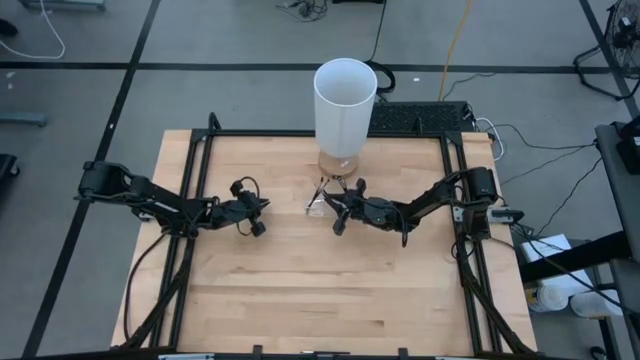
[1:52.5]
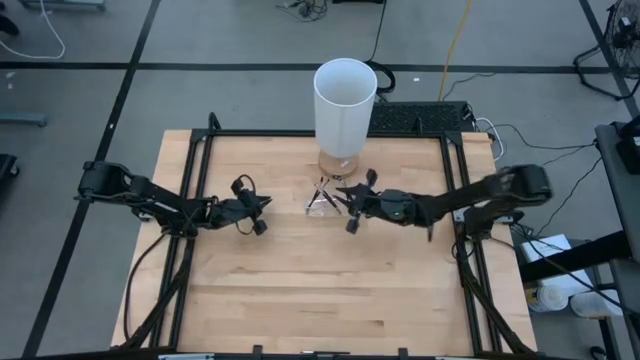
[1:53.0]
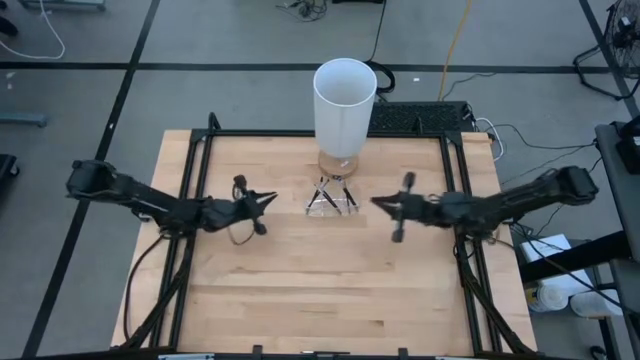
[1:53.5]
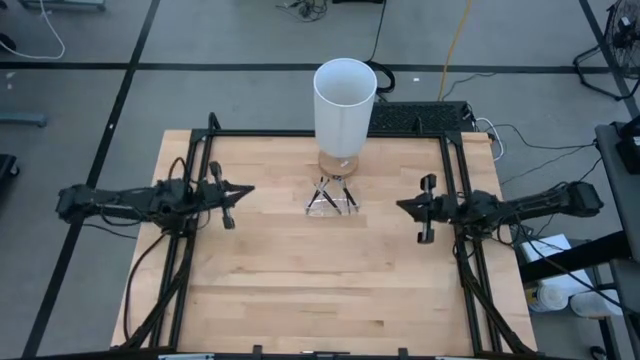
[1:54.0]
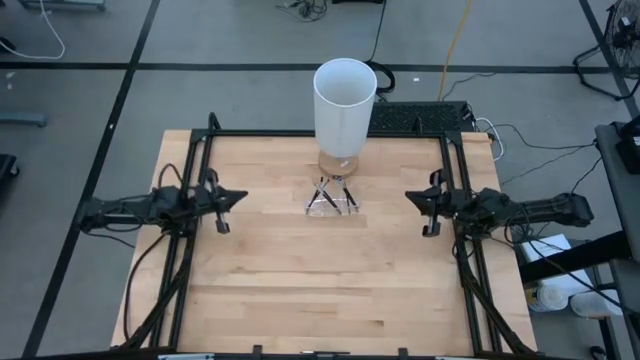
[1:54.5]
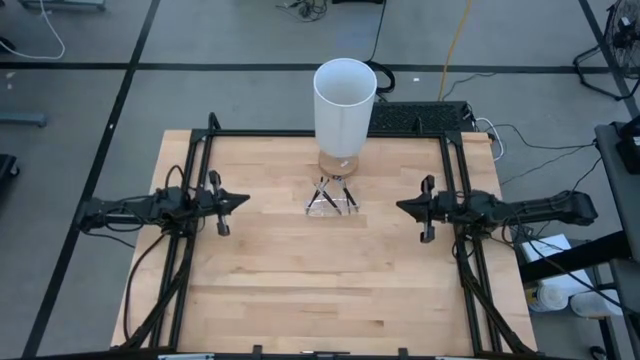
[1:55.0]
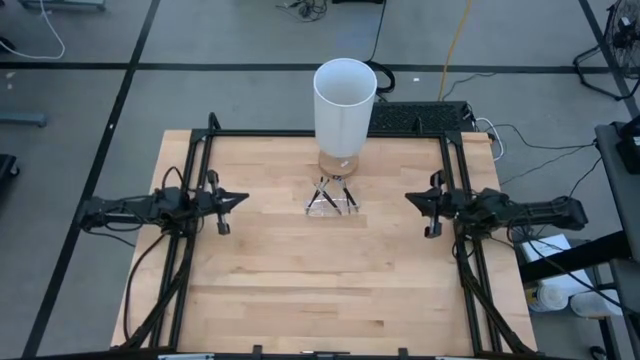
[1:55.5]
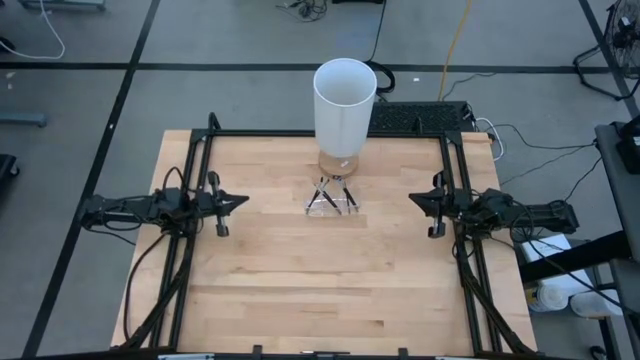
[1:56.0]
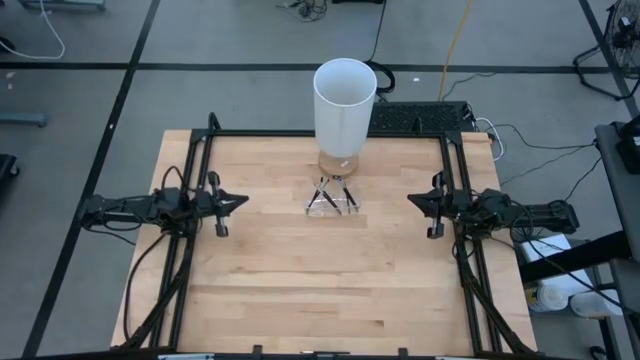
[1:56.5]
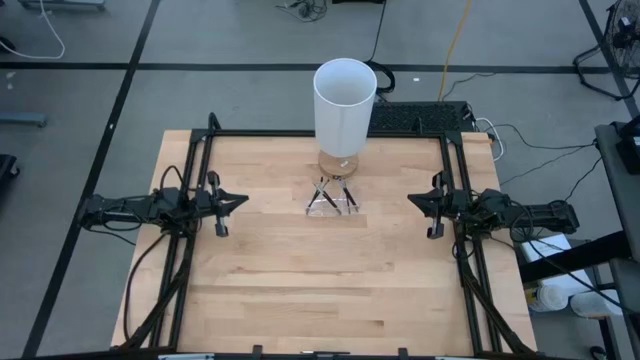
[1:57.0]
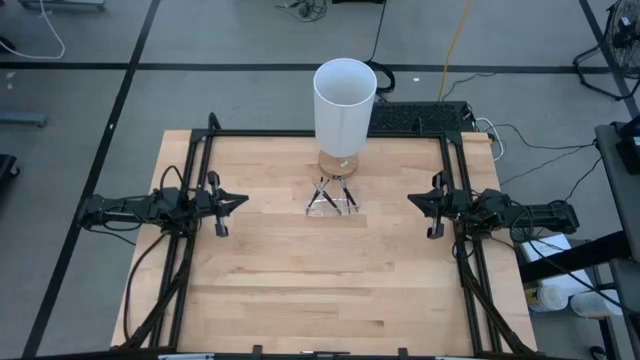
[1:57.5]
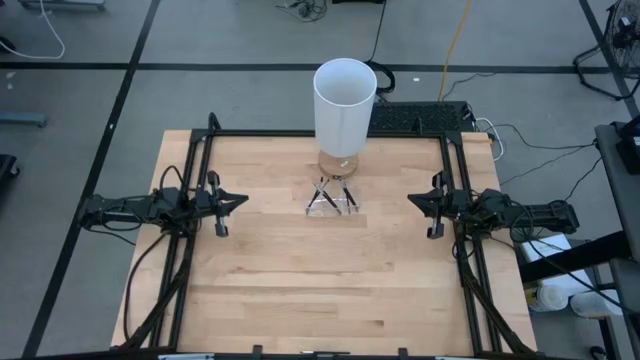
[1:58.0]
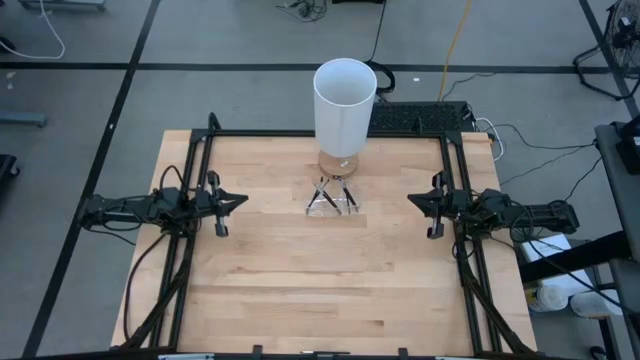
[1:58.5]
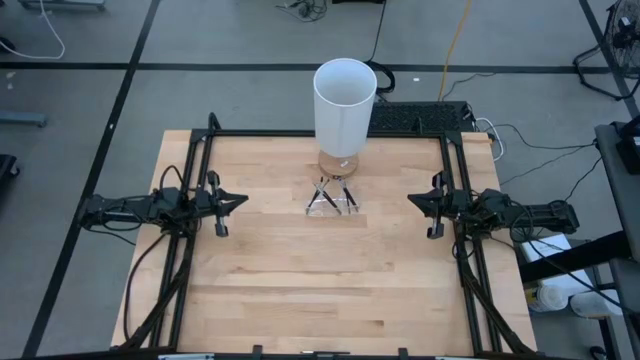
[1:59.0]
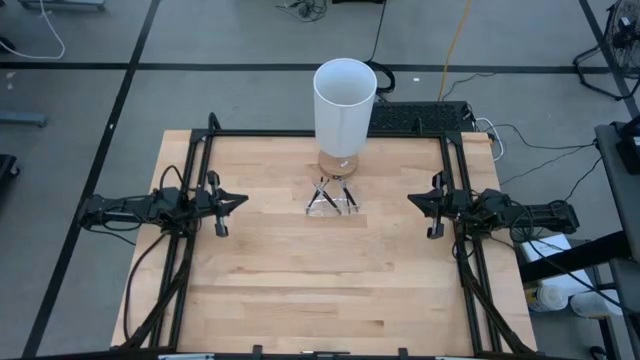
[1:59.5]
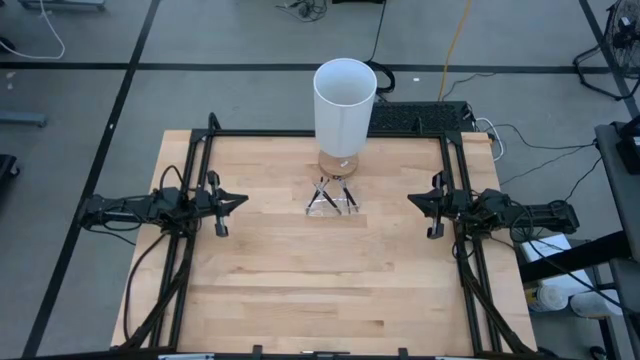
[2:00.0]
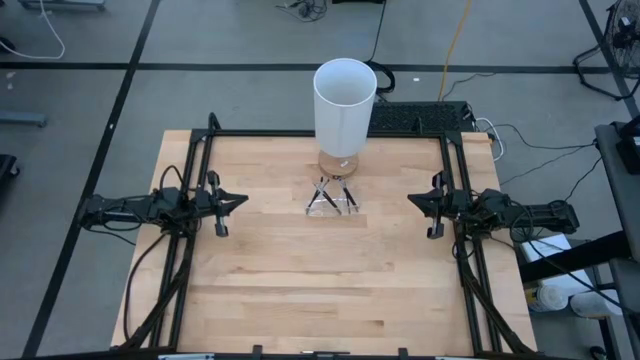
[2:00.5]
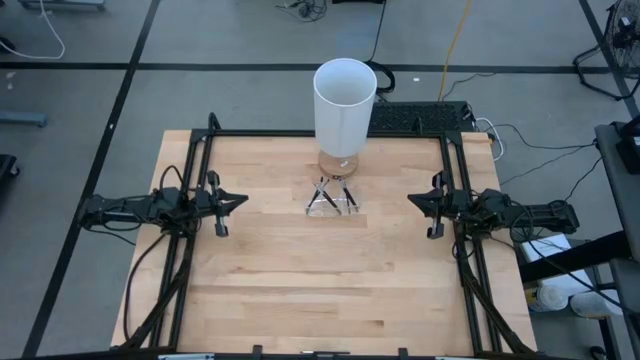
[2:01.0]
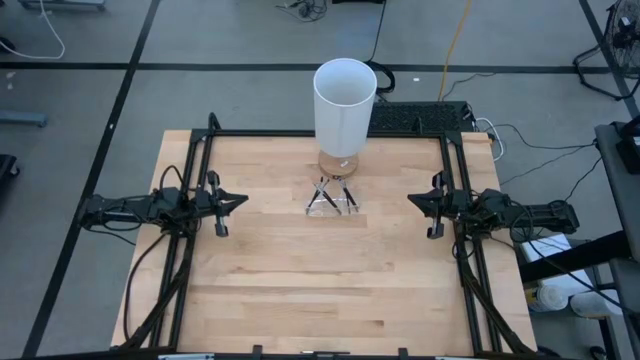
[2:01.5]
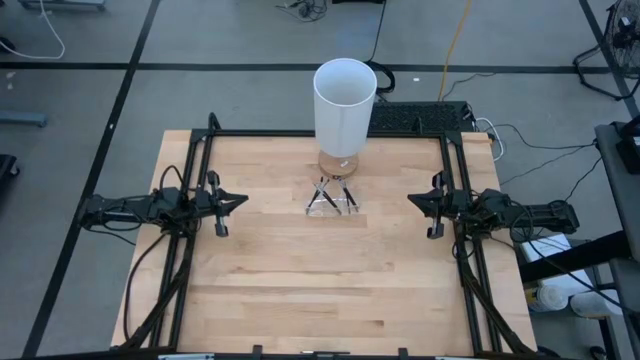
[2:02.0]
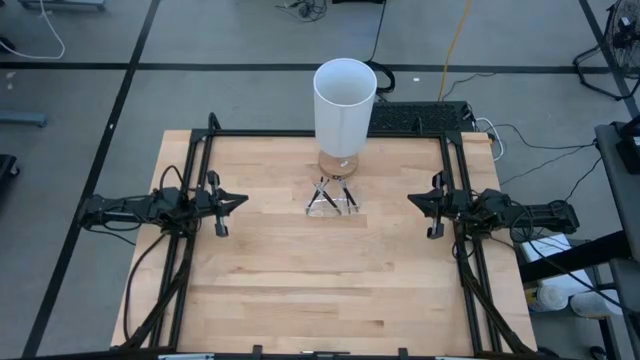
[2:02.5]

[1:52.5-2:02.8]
Task: Put items in baskets/containers
Return to Home Position

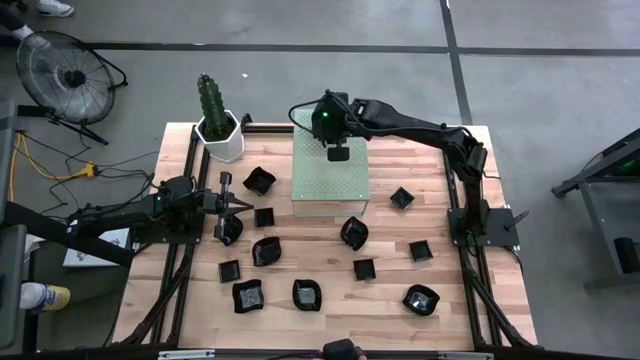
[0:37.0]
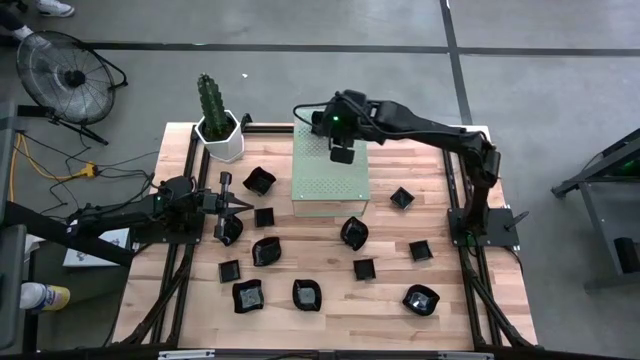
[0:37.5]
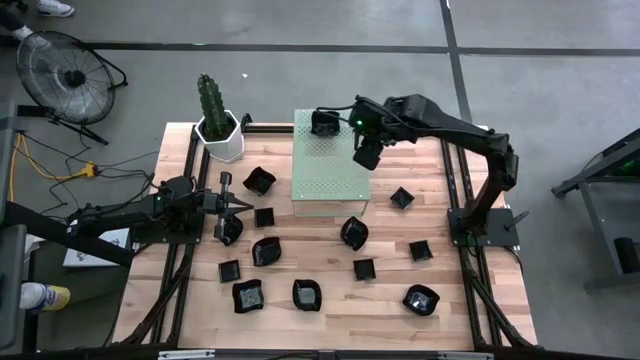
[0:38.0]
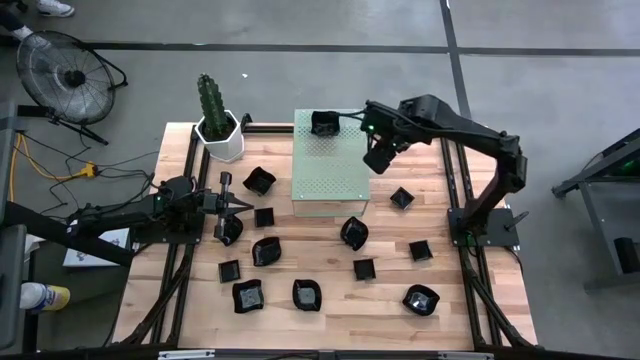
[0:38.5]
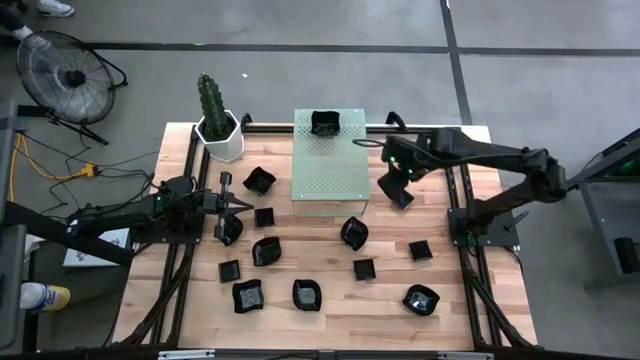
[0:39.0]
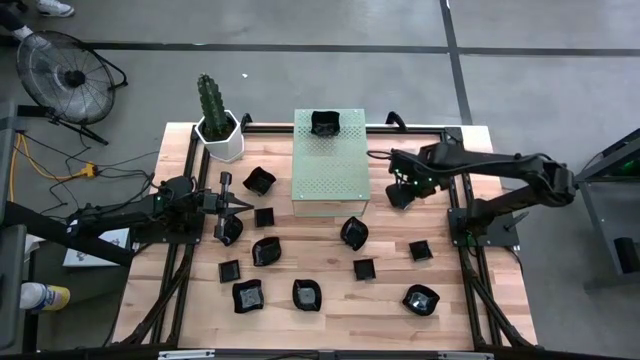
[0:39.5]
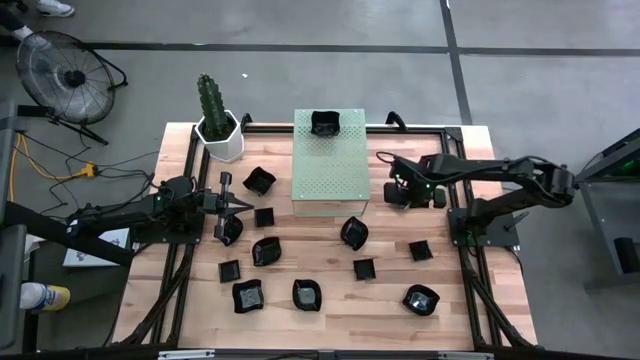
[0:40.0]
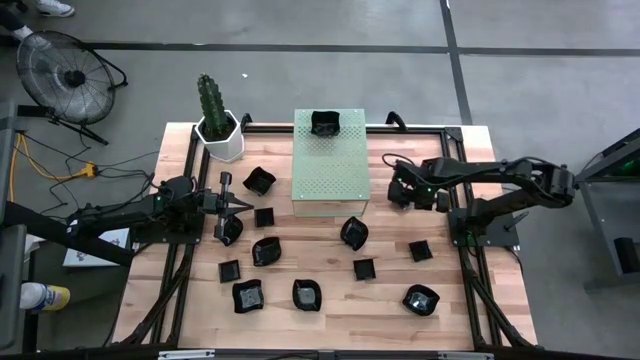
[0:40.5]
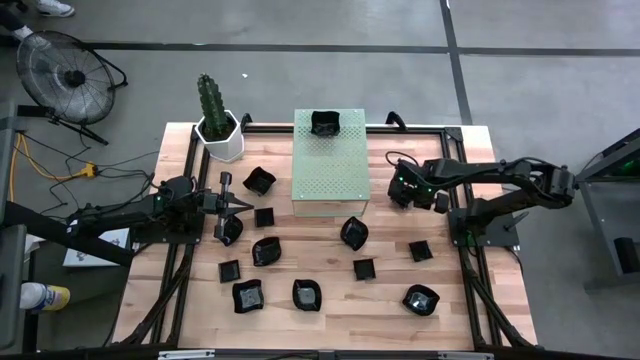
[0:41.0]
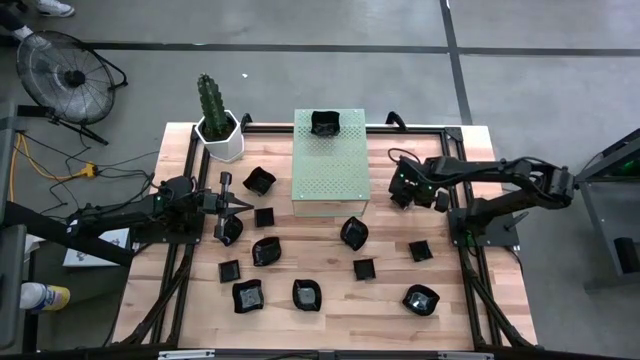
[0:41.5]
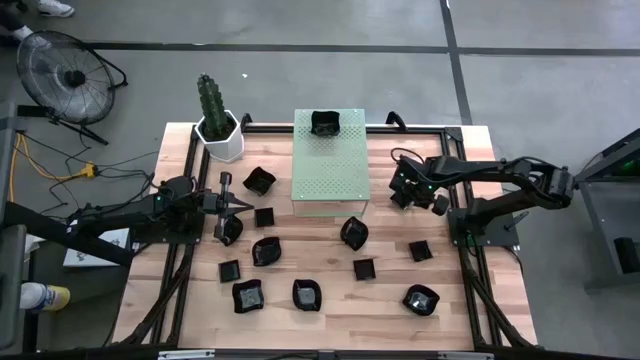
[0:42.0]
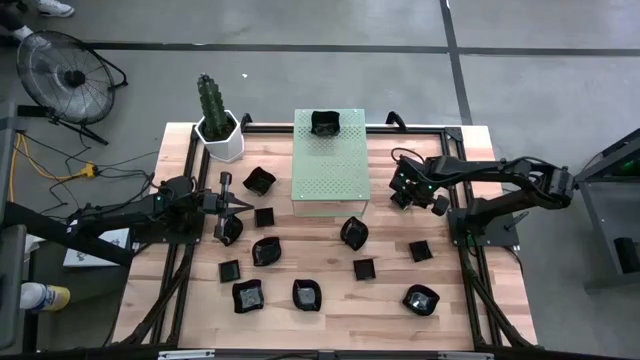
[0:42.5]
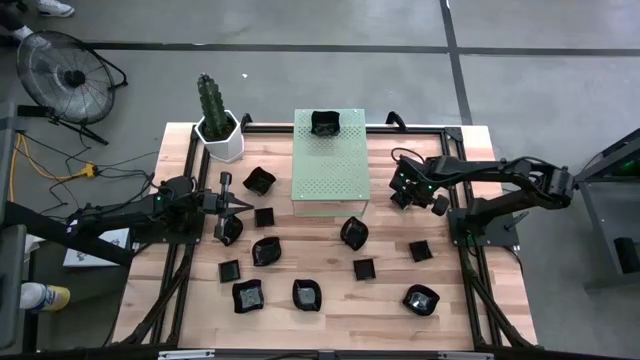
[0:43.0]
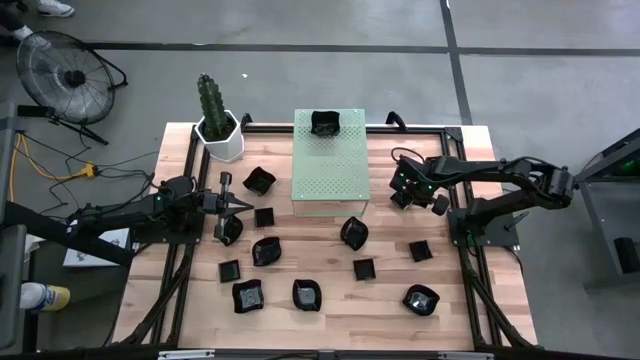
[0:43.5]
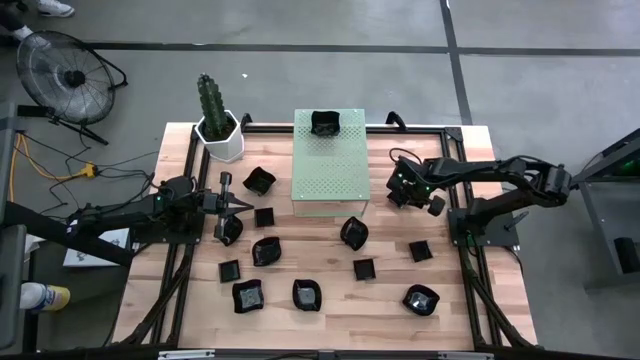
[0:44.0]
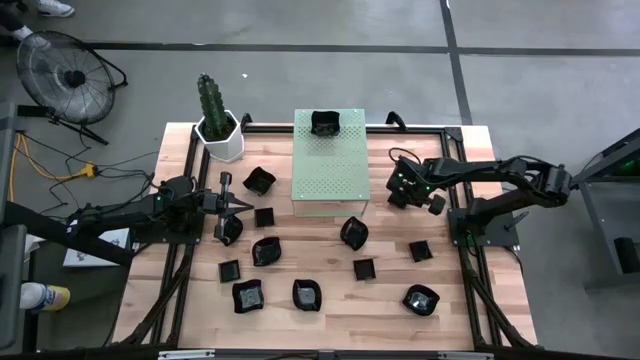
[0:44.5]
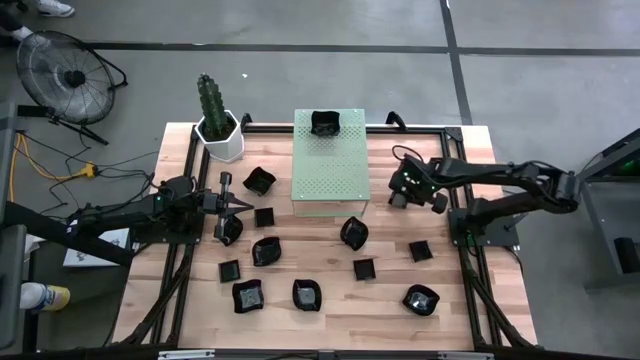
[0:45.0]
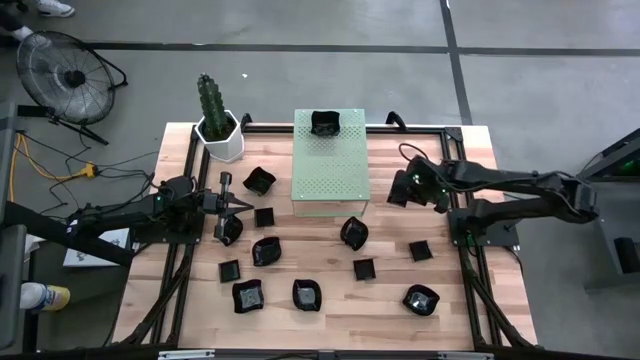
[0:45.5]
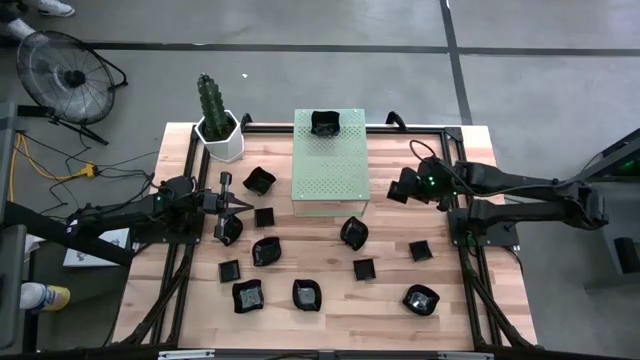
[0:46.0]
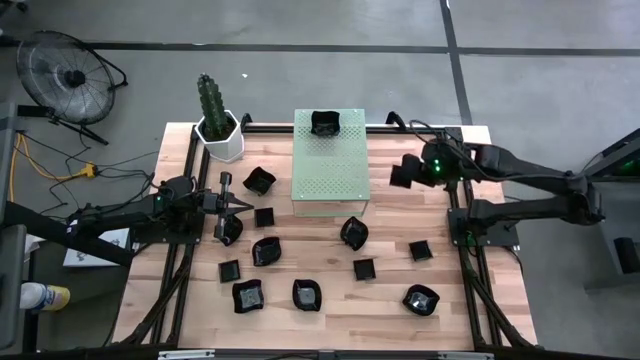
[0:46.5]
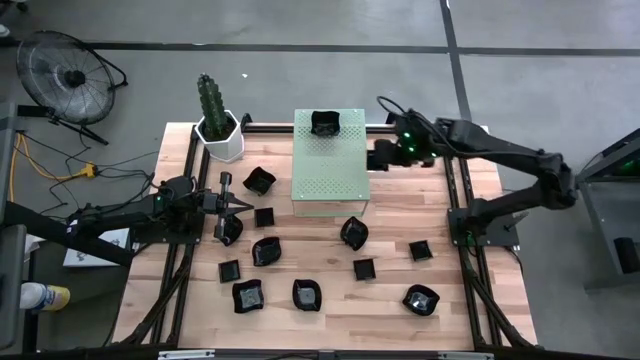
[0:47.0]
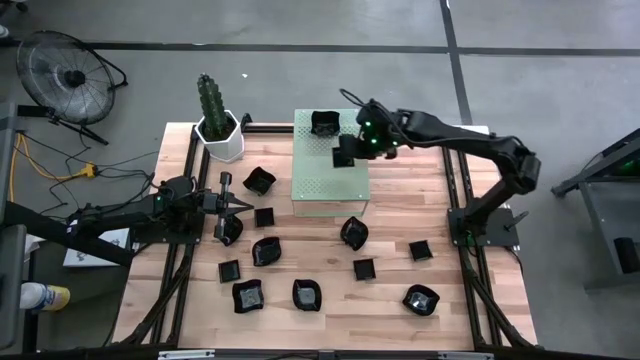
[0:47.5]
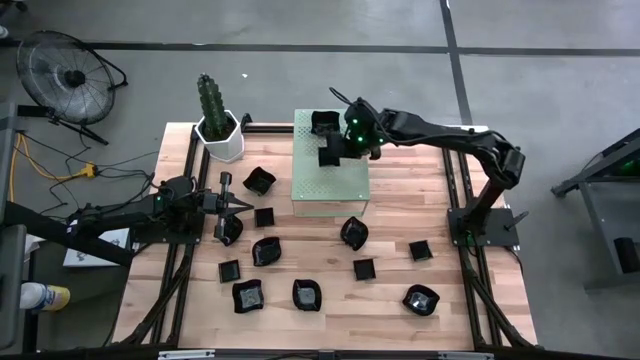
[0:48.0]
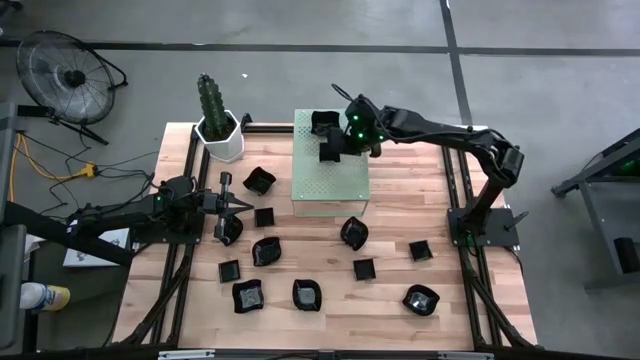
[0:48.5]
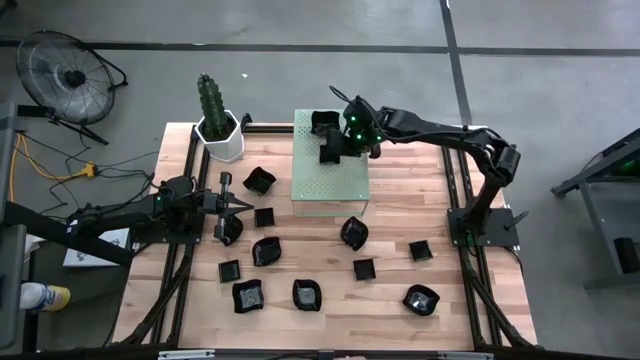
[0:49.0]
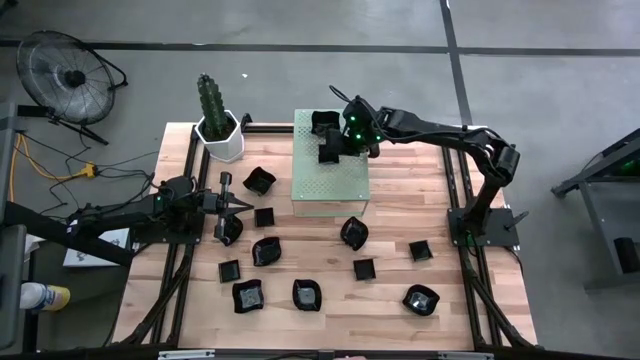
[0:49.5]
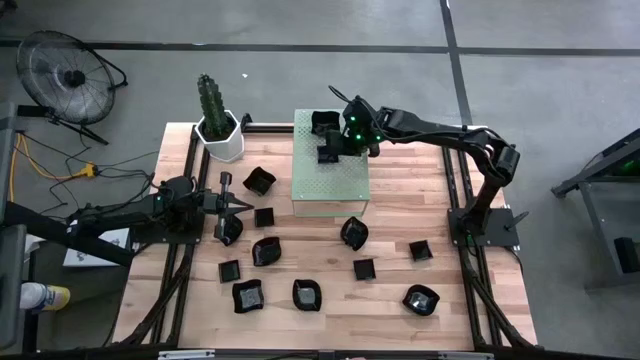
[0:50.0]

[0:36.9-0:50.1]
Task: Pick & Place Mini shaped plates
Put the black square plate on the shelf
